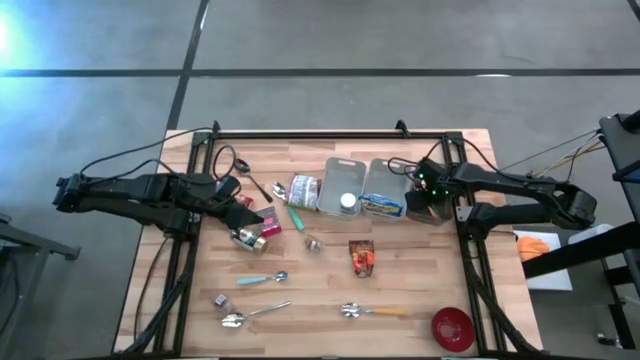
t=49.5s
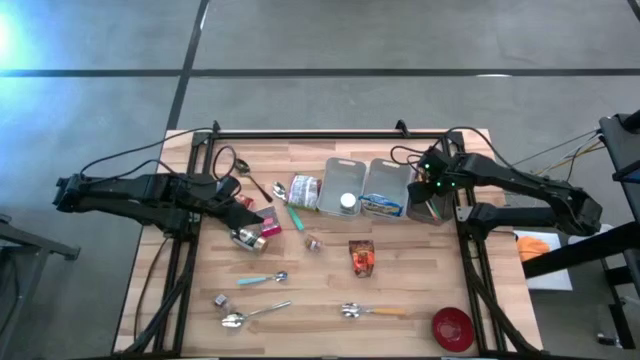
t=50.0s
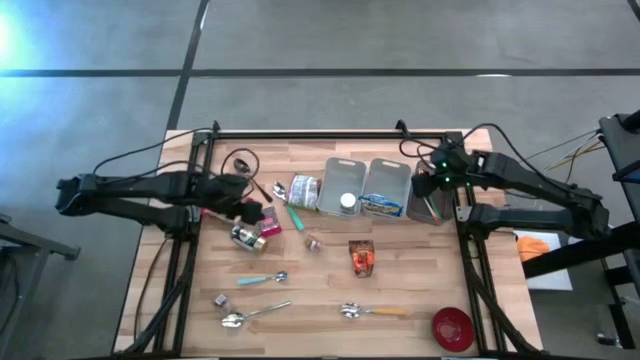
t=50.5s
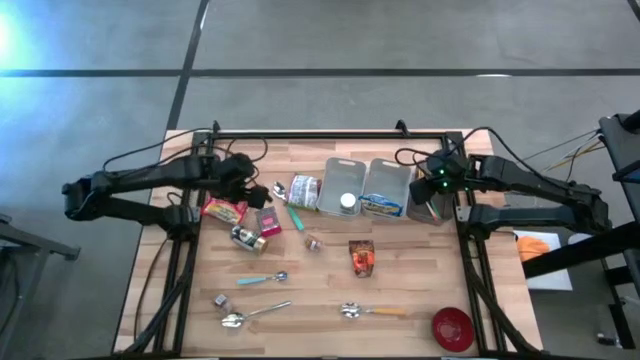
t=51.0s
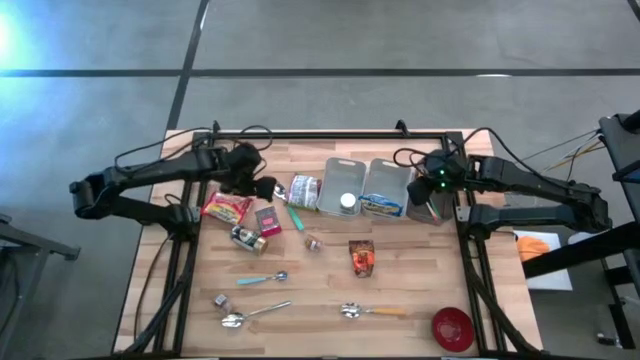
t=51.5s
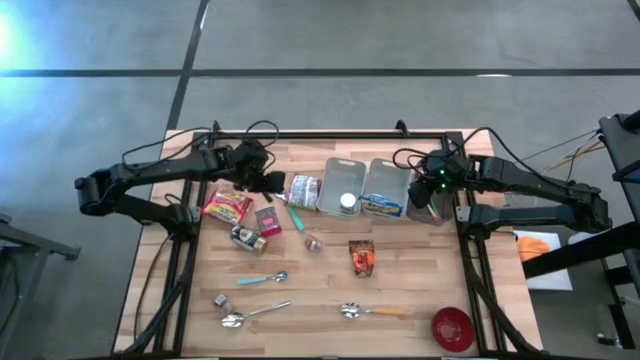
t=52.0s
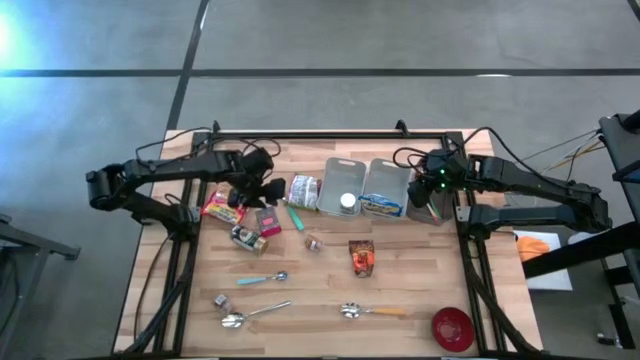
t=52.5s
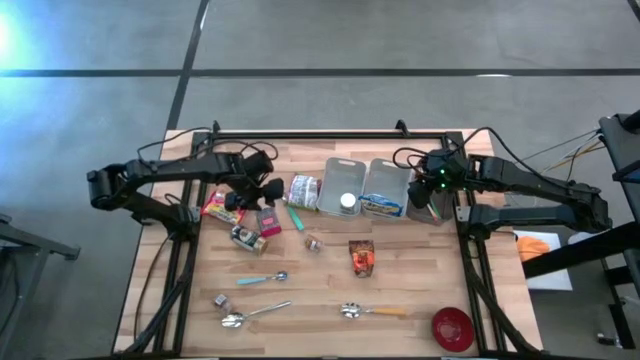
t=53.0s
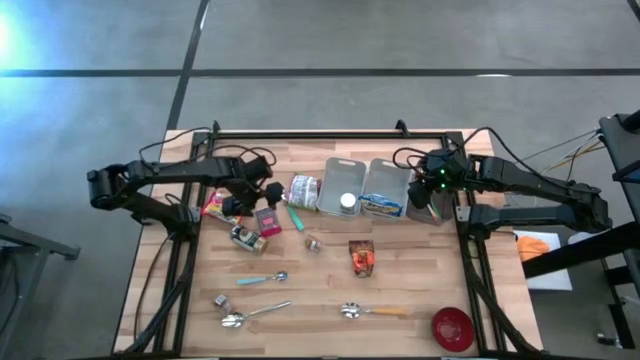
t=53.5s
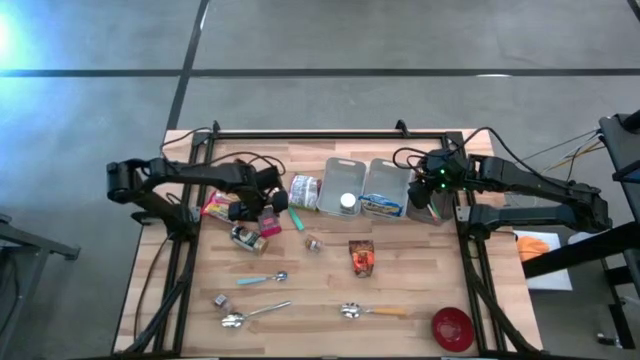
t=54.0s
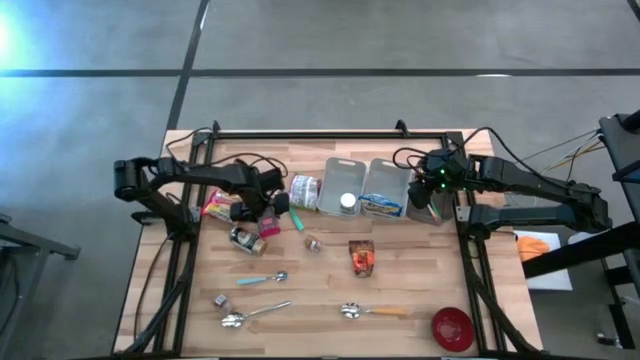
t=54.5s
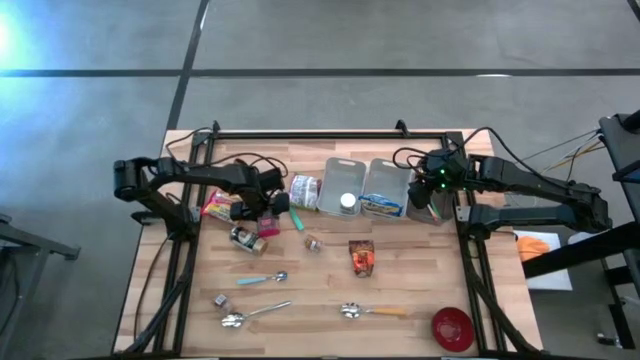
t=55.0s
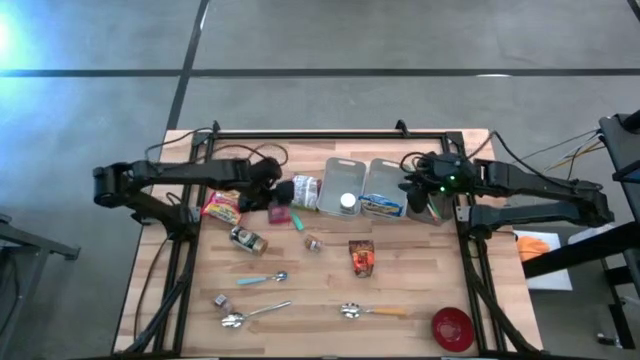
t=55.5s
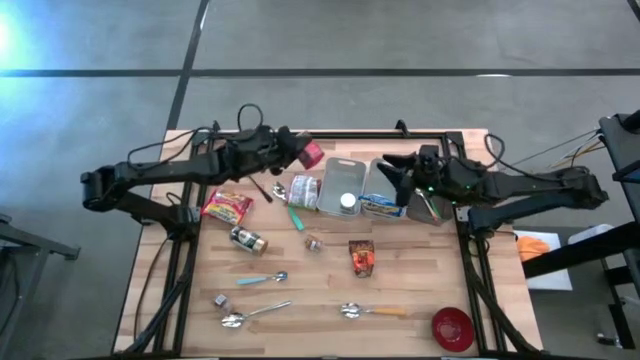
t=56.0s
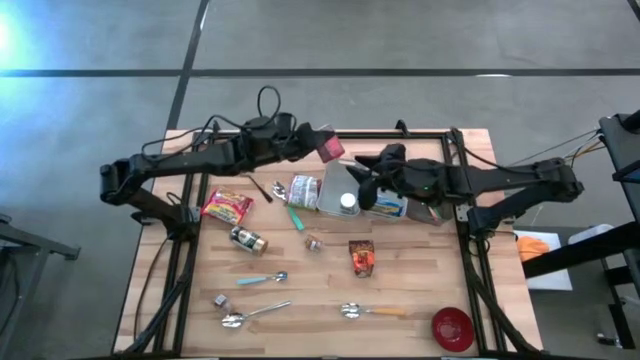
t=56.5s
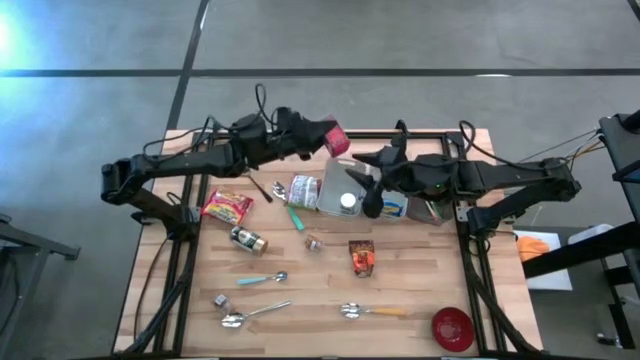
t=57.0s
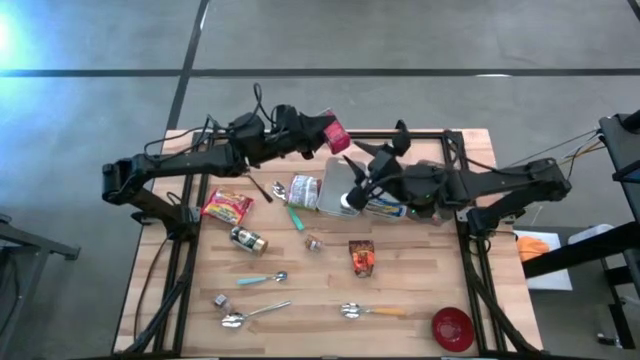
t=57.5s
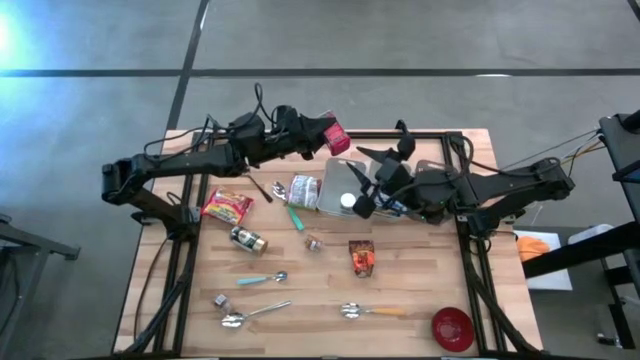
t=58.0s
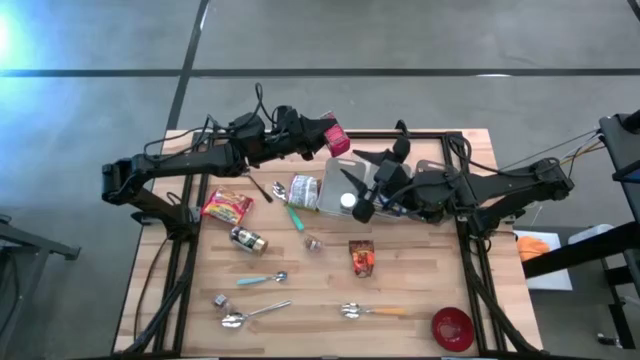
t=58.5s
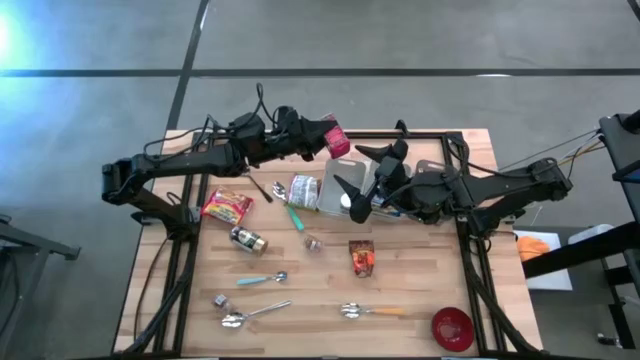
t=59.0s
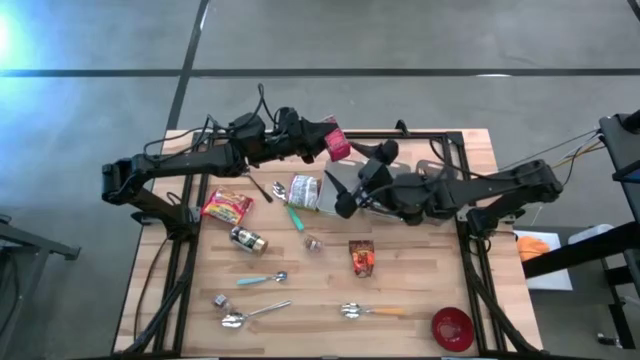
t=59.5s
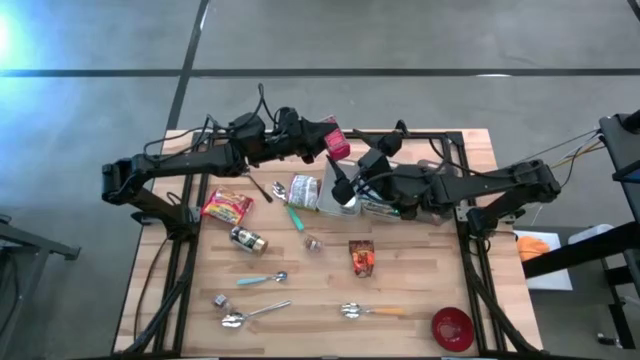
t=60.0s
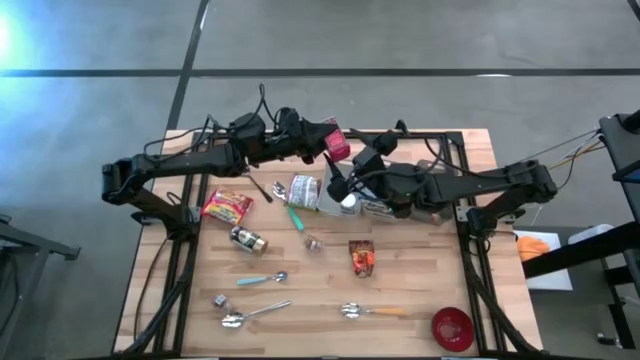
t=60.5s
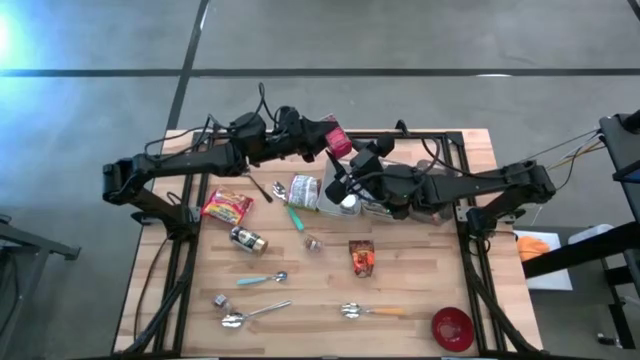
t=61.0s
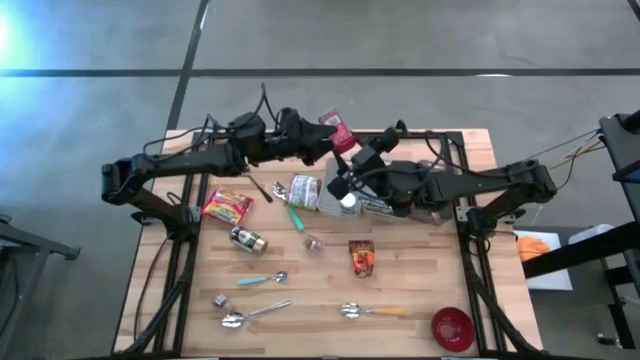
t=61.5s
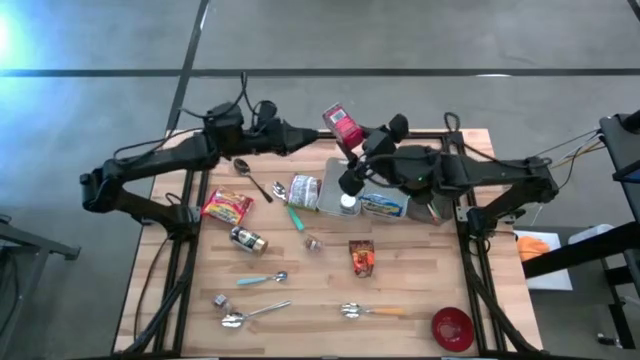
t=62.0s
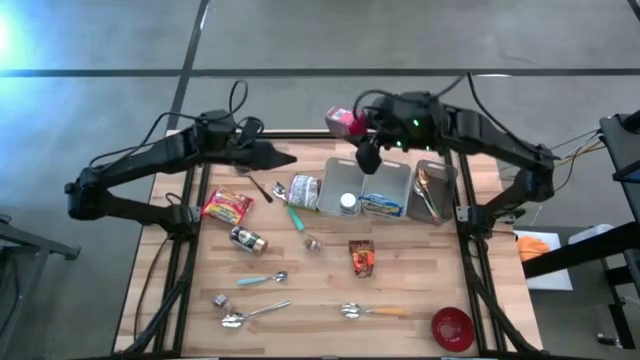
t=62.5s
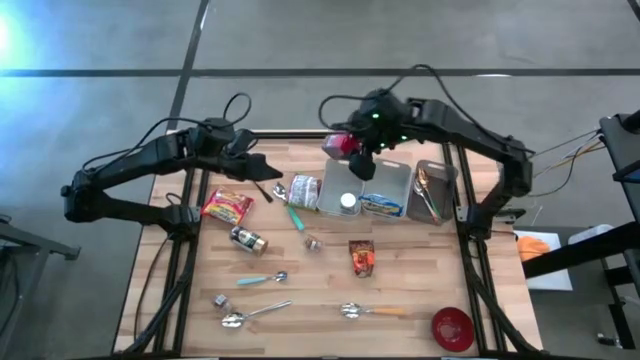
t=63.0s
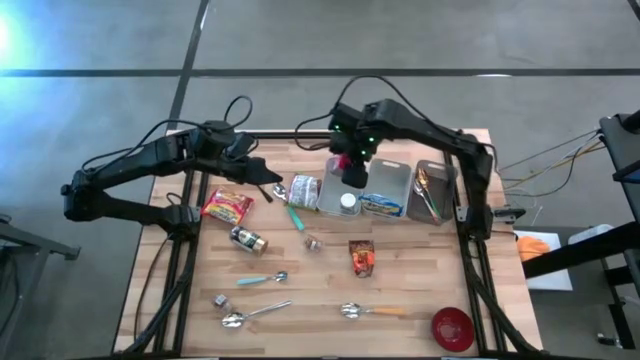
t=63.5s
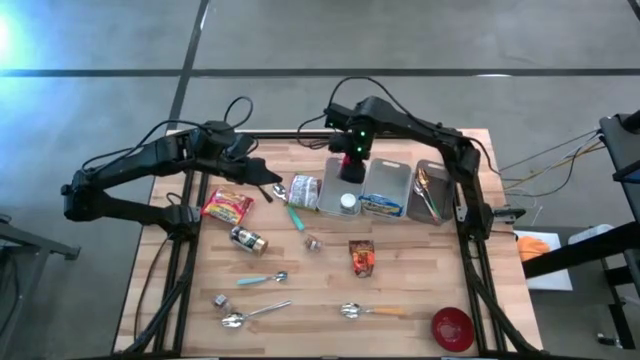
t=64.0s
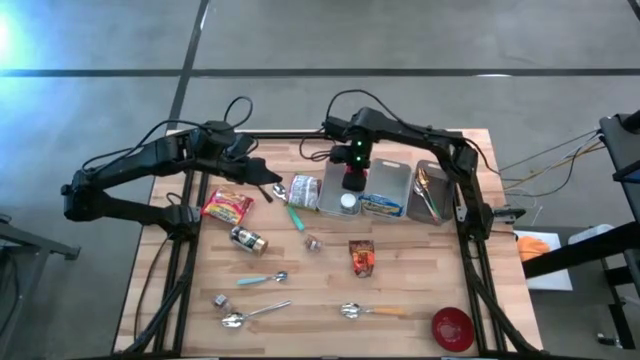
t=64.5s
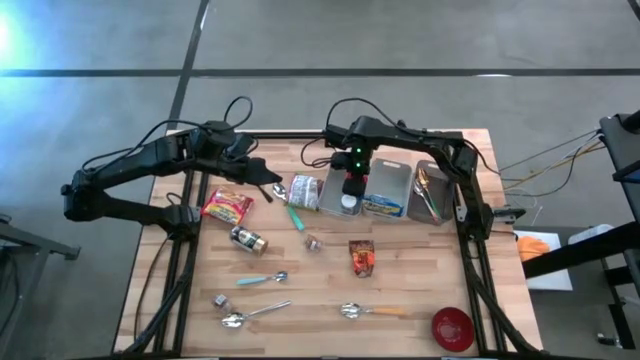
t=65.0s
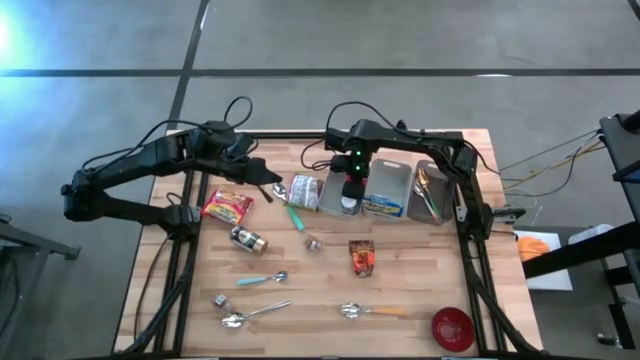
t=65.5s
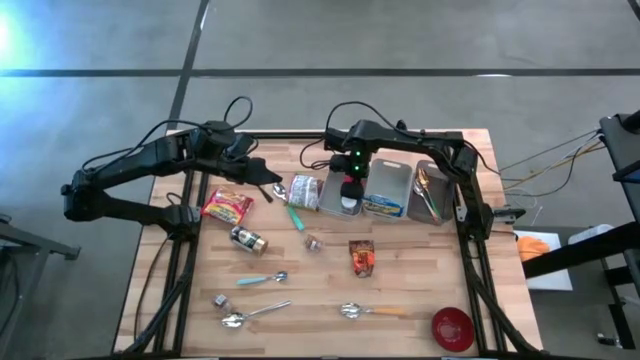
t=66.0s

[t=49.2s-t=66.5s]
Put the red seasoning can into the left gray bin
